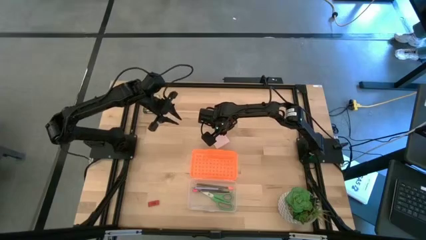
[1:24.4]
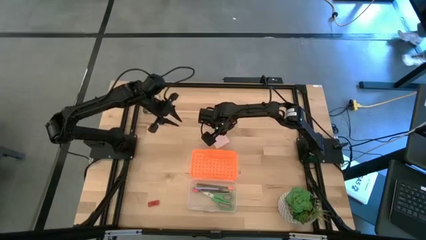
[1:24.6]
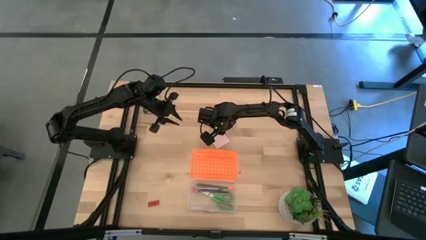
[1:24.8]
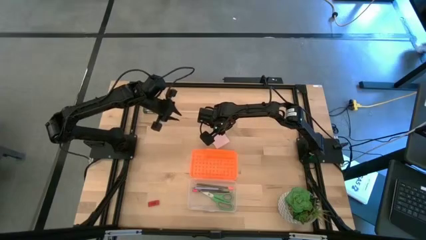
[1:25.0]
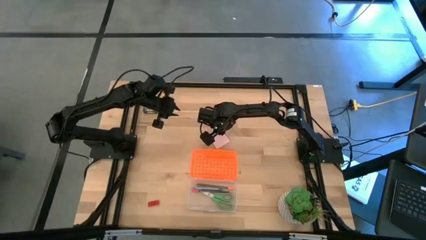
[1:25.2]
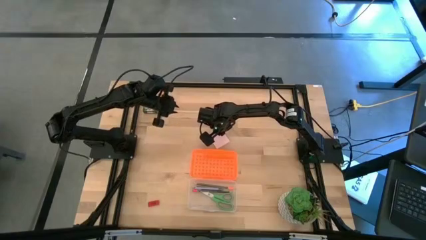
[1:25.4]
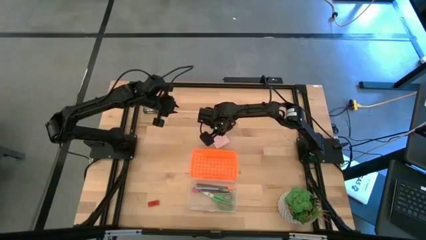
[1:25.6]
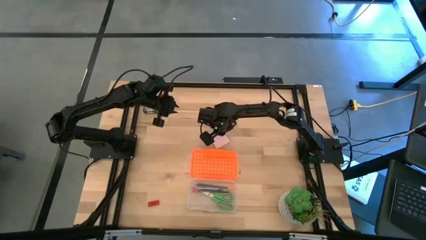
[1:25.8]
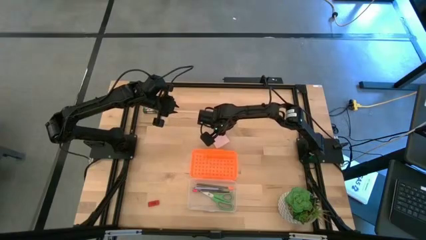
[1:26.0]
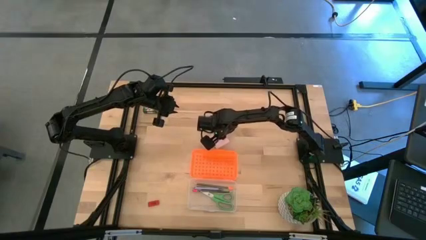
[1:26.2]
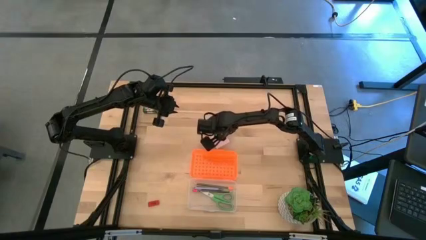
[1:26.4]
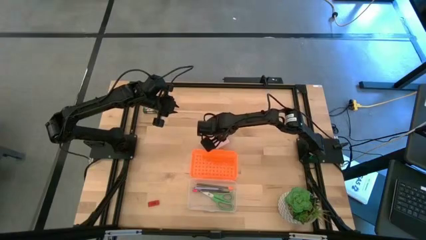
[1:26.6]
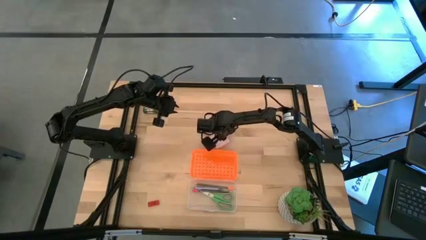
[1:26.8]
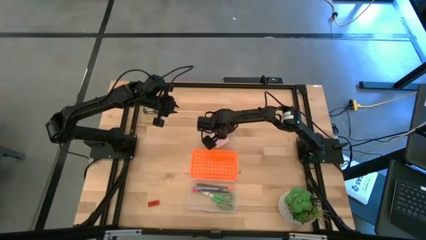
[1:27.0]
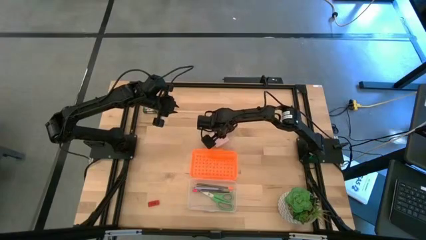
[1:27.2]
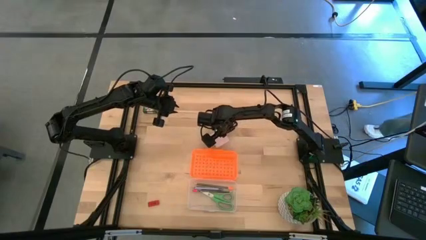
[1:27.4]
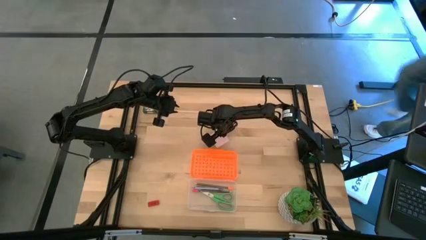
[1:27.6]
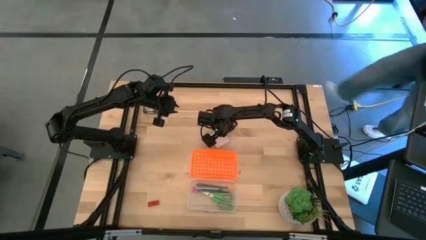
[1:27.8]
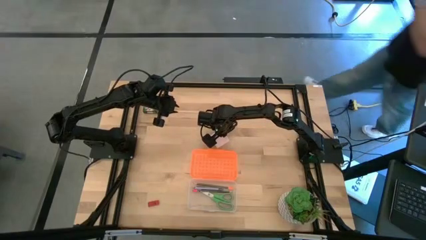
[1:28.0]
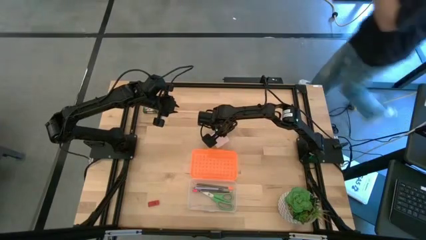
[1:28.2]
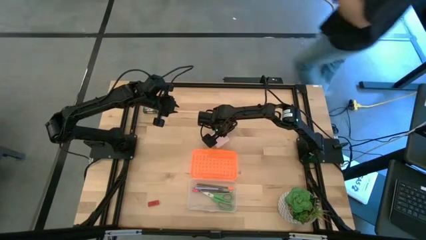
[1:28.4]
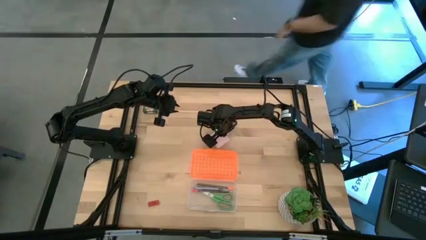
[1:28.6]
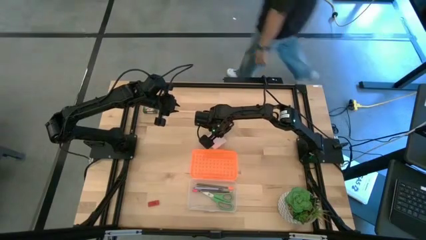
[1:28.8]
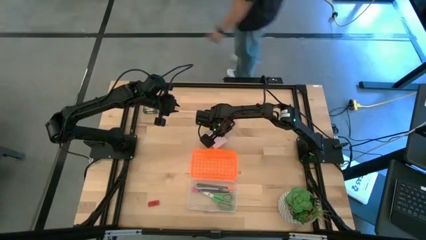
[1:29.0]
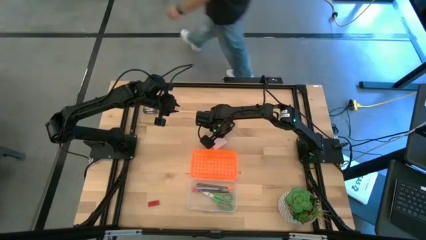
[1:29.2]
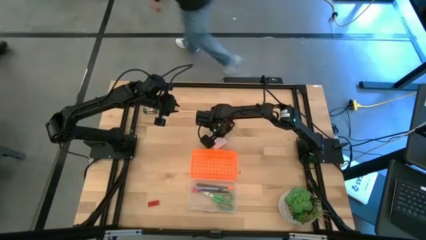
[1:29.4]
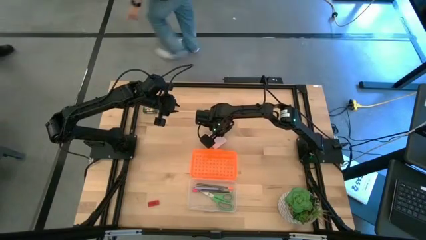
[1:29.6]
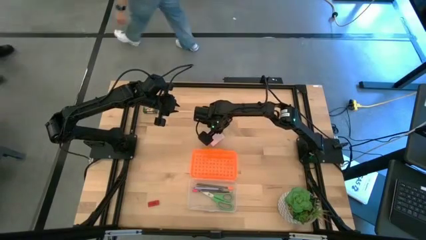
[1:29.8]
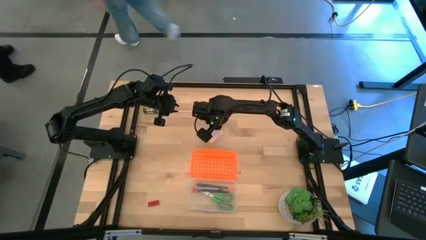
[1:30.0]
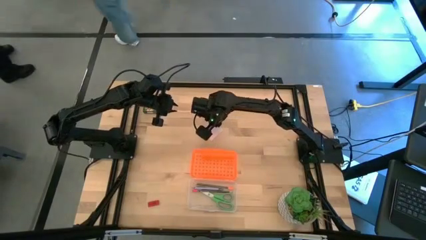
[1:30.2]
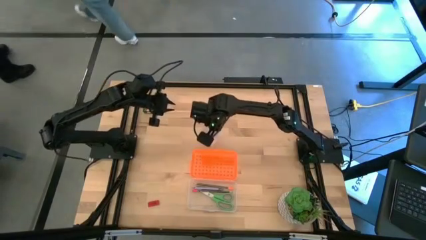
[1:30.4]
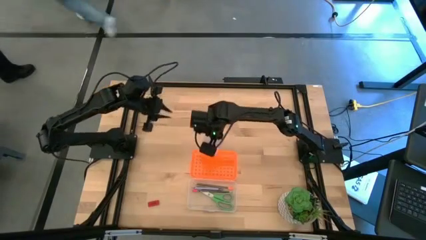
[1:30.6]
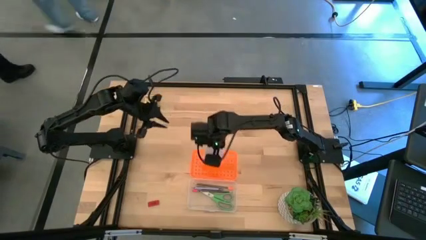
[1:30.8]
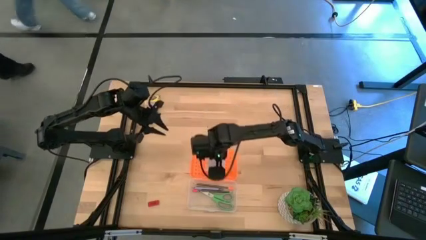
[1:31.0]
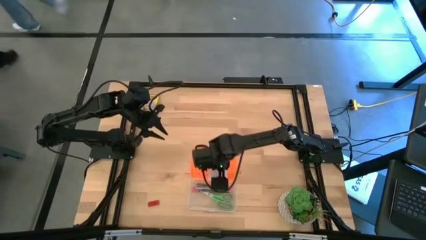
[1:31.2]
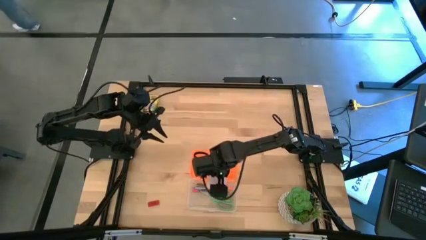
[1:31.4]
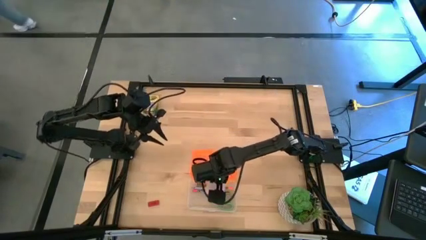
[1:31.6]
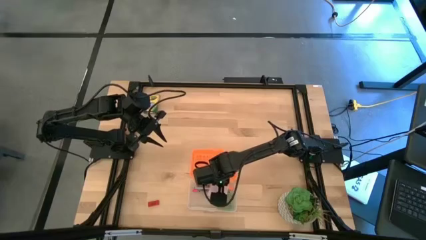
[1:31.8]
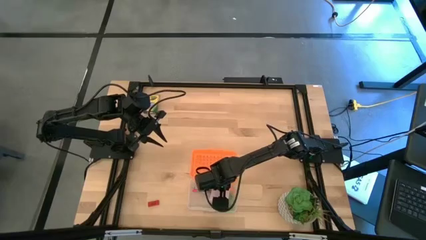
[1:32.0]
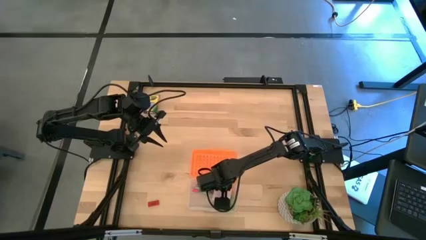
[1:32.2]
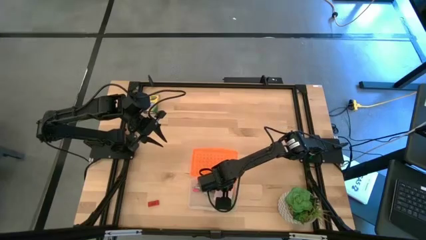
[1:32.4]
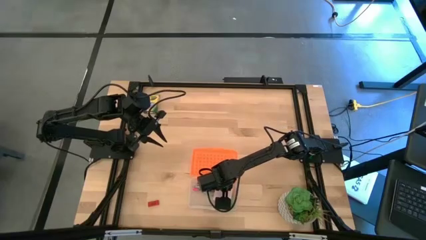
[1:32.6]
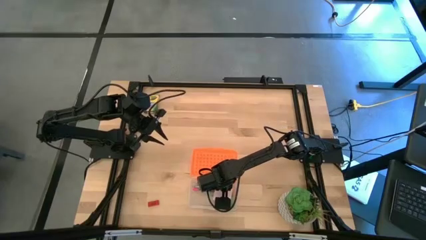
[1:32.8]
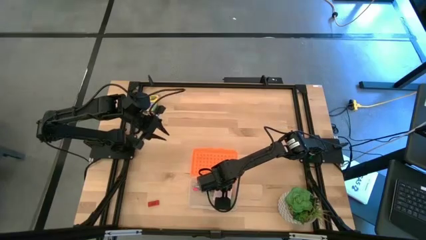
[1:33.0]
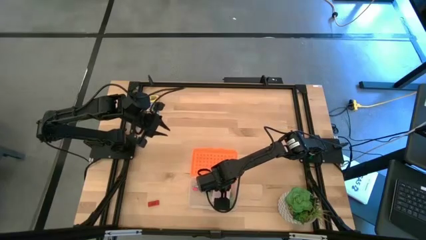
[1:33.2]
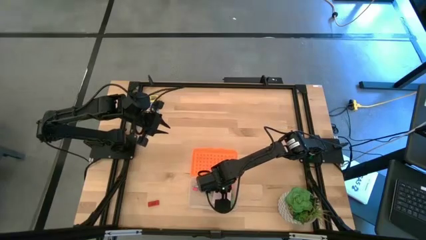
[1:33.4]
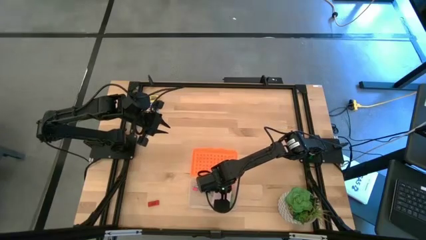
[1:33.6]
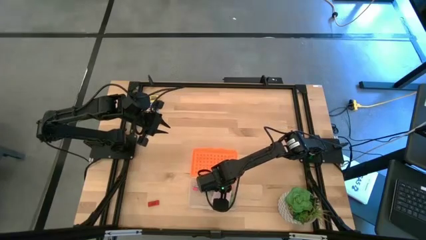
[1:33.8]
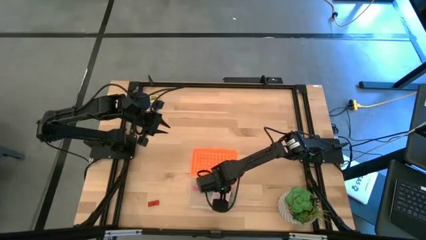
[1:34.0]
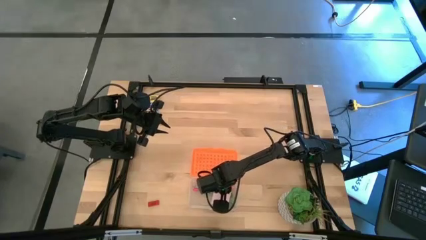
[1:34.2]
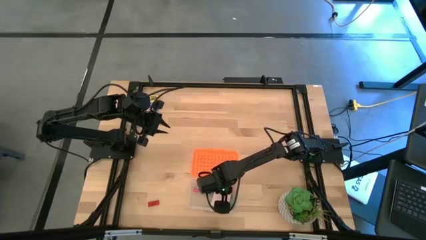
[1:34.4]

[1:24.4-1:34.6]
Task: Pack school essentials
Put the pink sticky note into the orange supply box

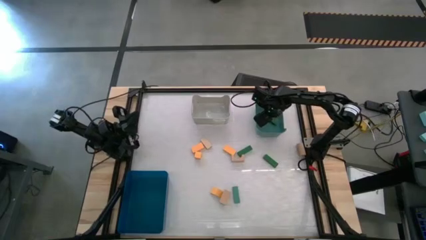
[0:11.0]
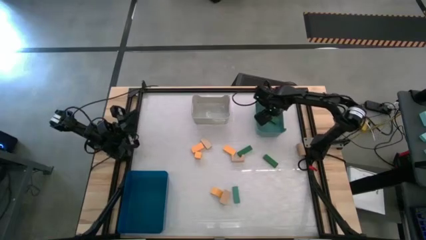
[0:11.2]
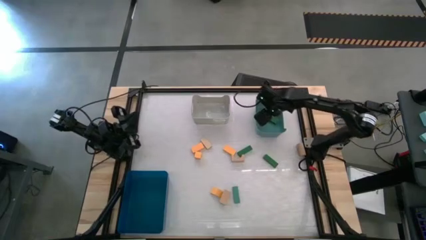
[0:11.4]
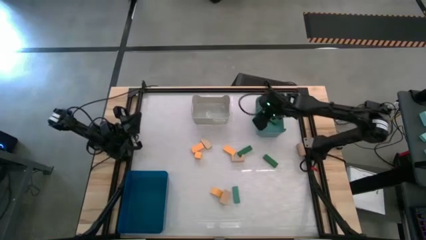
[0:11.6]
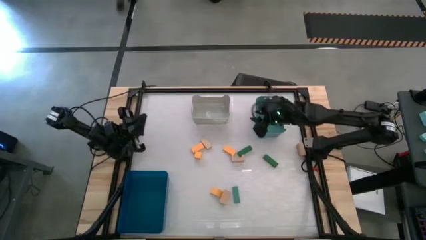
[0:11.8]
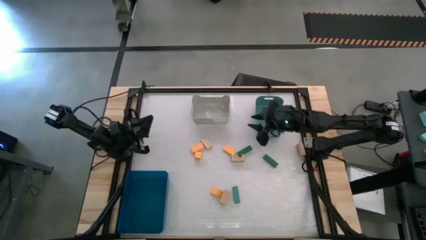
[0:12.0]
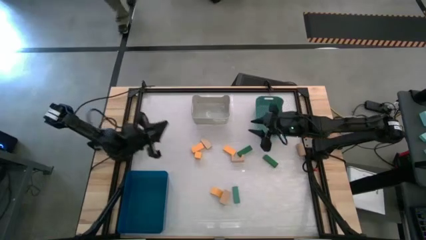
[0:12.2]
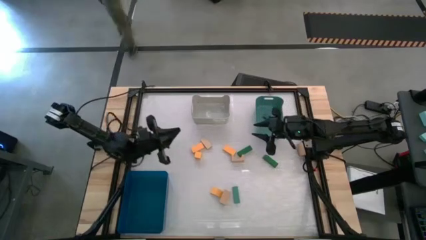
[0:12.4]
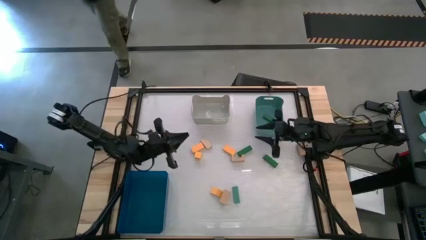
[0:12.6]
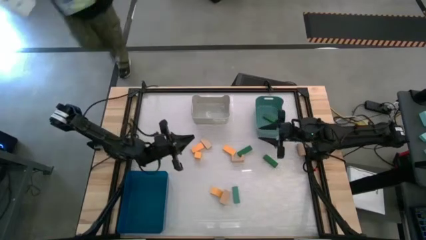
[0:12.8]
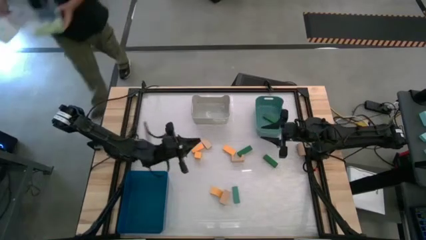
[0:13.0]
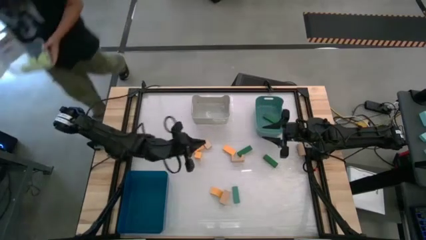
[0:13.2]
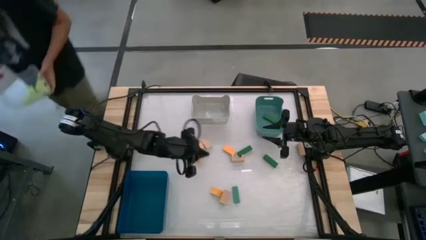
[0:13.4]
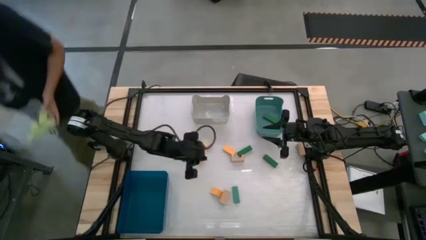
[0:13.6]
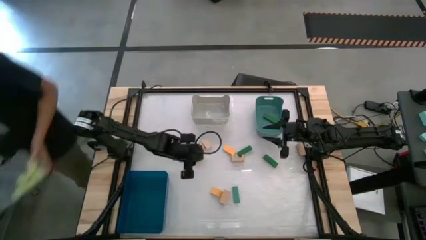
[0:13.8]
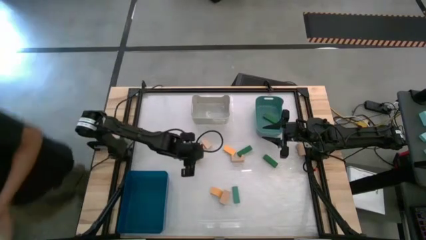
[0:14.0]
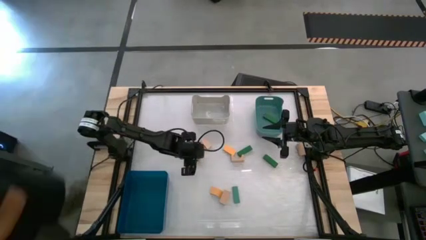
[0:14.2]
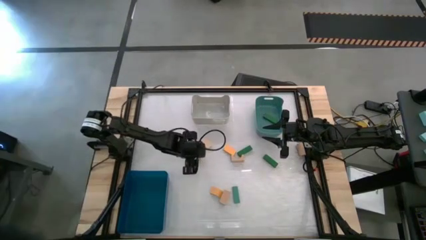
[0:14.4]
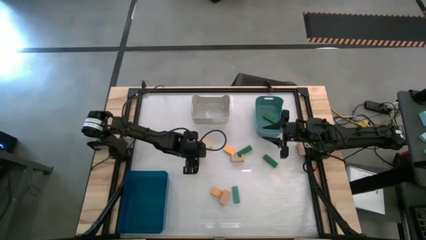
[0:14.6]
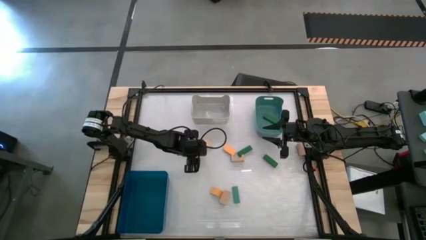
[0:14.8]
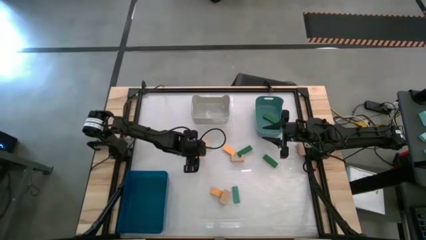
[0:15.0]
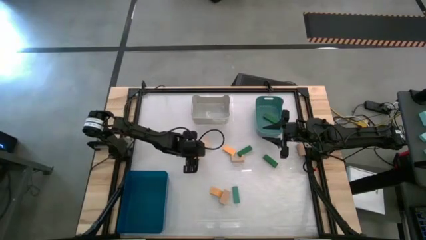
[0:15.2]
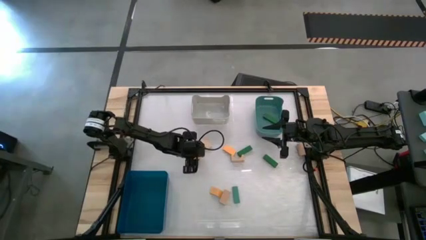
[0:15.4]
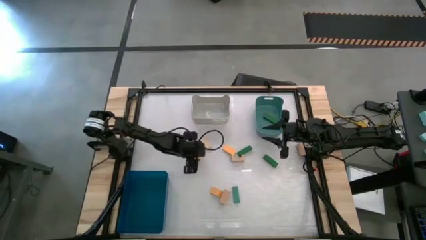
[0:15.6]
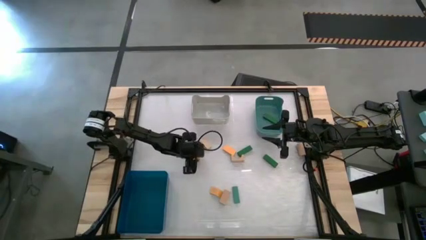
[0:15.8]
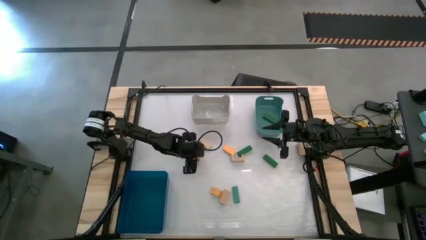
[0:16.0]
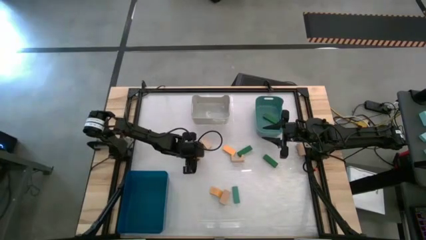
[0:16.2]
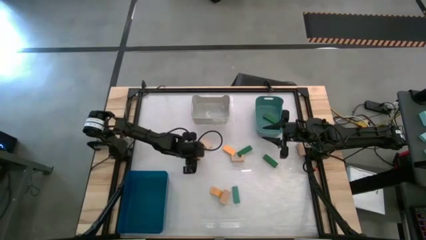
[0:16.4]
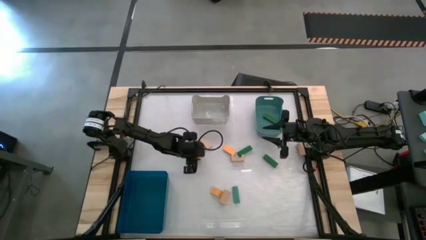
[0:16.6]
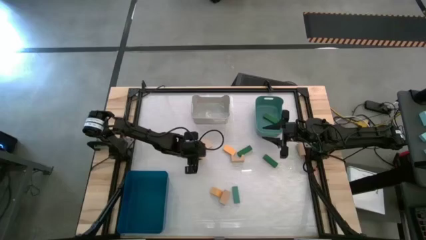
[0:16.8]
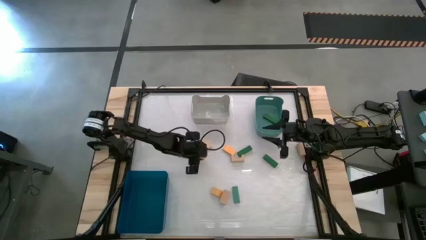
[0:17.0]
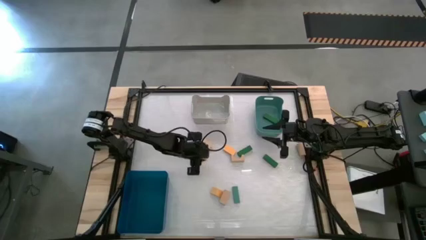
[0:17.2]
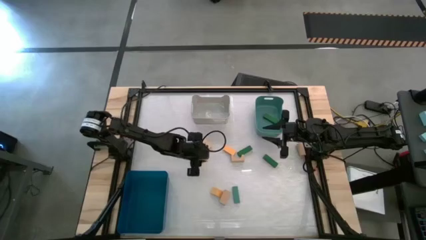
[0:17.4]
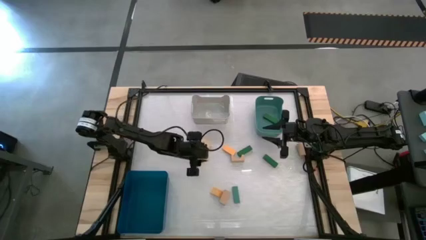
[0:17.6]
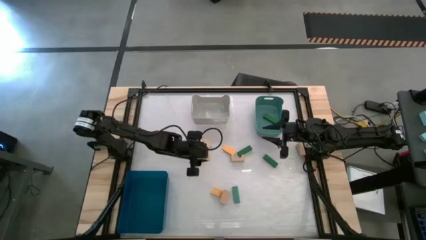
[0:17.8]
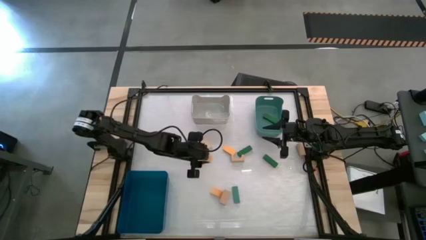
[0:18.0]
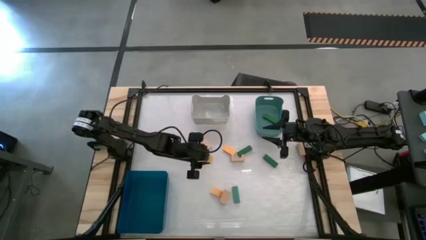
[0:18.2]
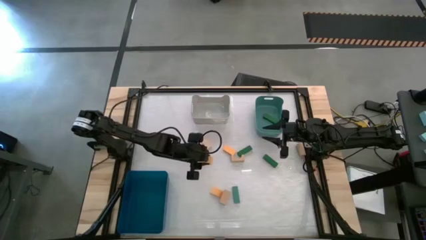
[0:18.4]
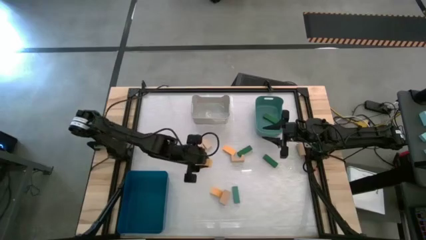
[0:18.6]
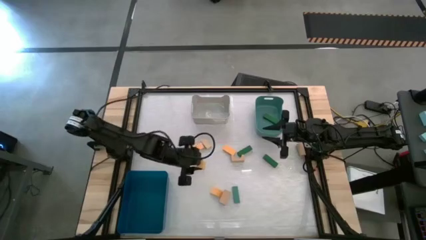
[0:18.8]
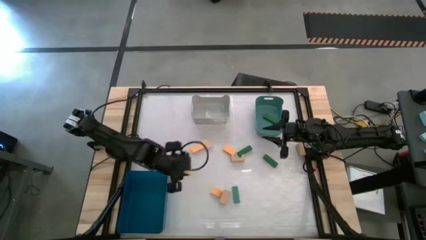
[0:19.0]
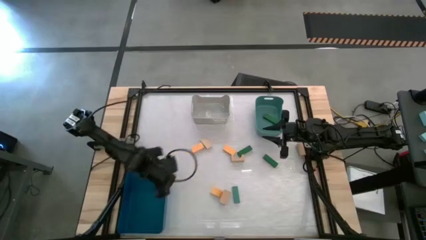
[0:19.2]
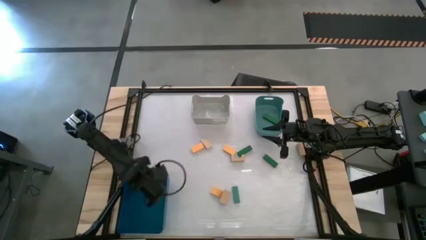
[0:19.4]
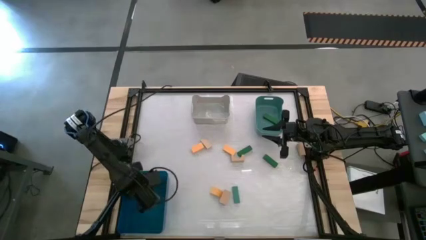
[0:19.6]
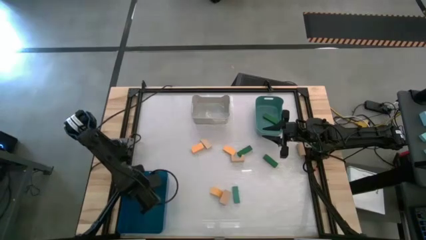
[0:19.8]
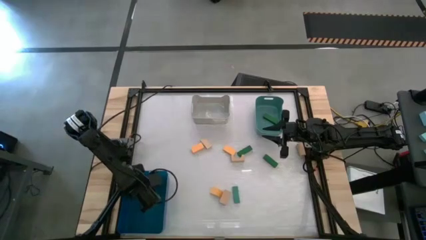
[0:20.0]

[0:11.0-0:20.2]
Task: Sort & place blocks by color
Put the yellow block into the blue bin
